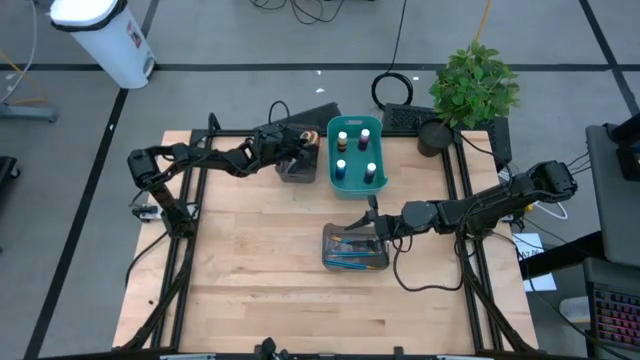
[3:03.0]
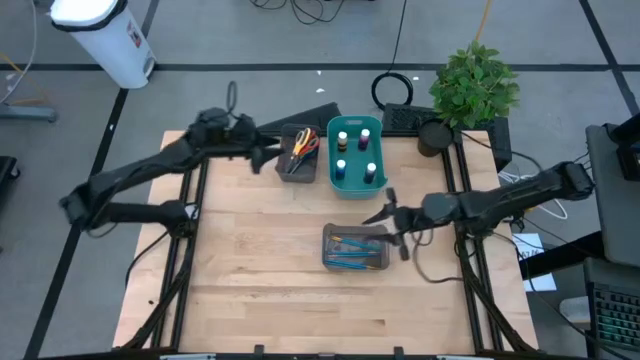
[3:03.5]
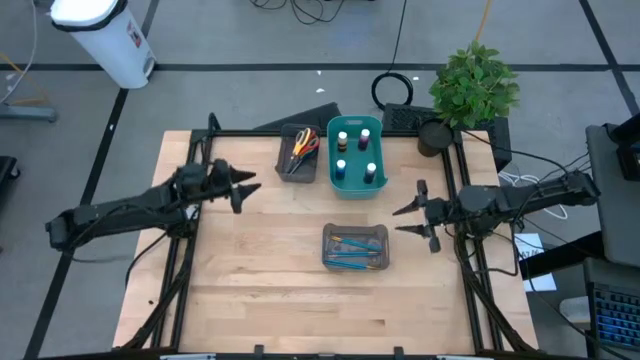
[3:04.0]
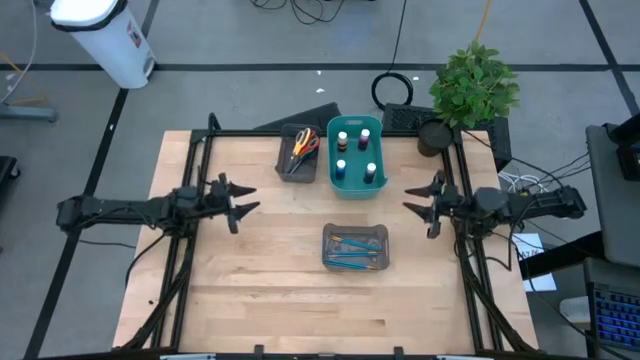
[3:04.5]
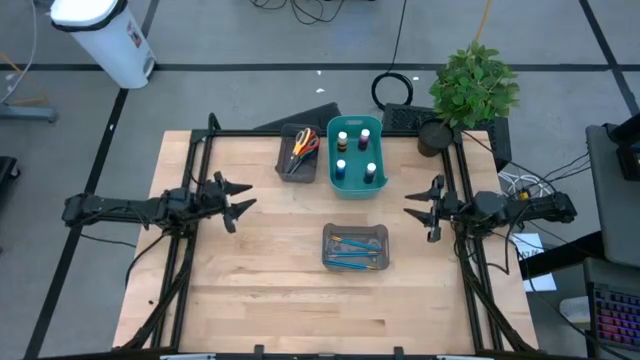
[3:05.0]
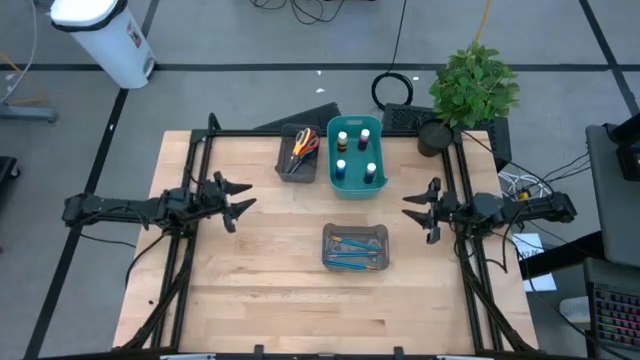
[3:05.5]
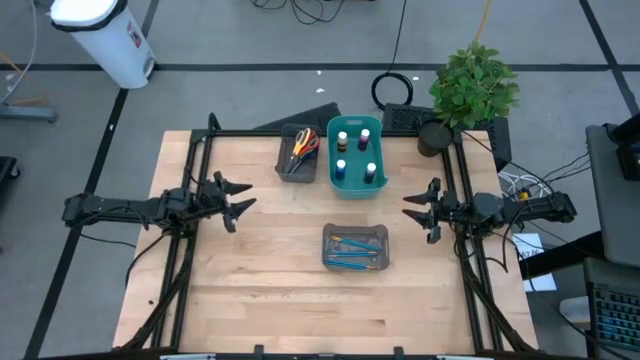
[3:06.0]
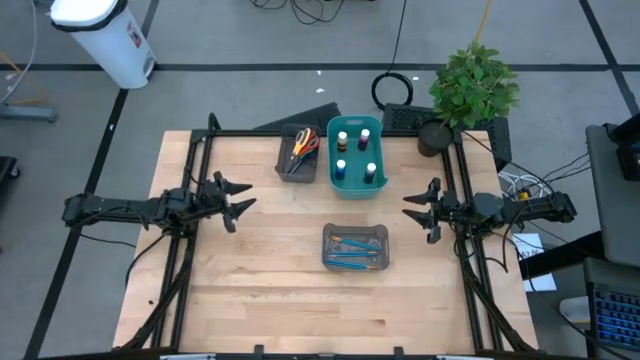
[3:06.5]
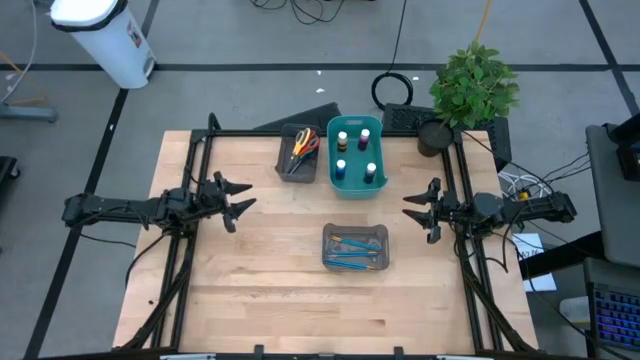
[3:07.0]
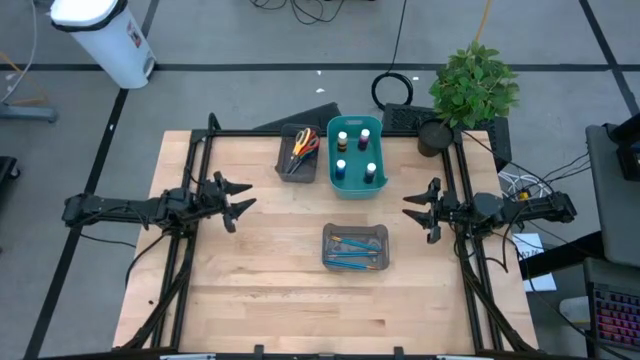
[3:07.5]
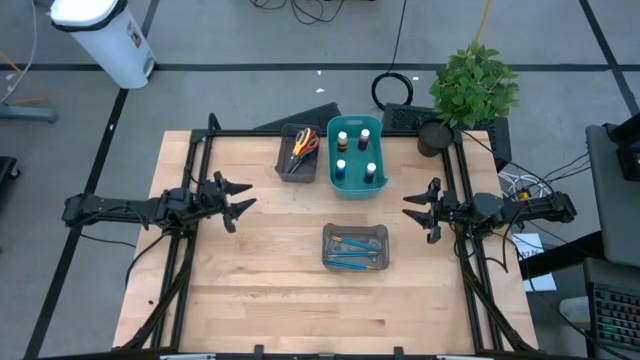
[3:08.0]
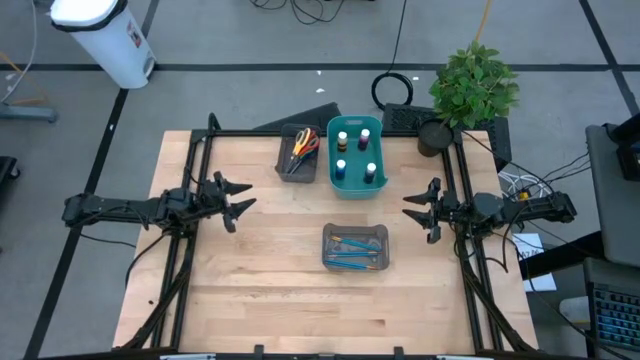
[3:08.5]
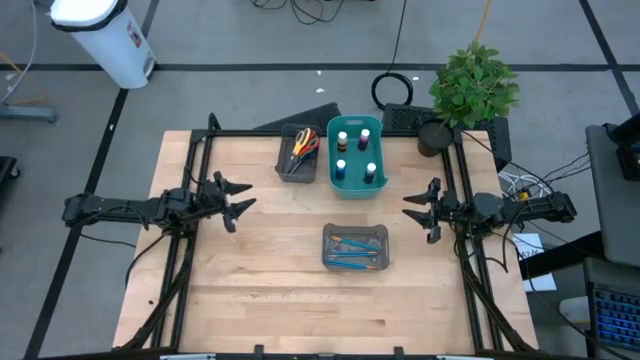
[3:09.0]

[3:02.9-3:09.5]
Task: Pick & Place Paint Supplies
Return to Home Position

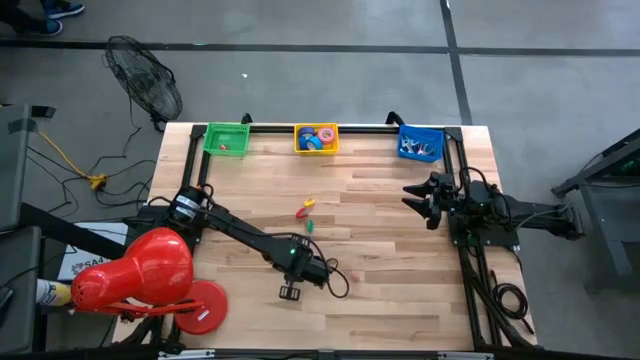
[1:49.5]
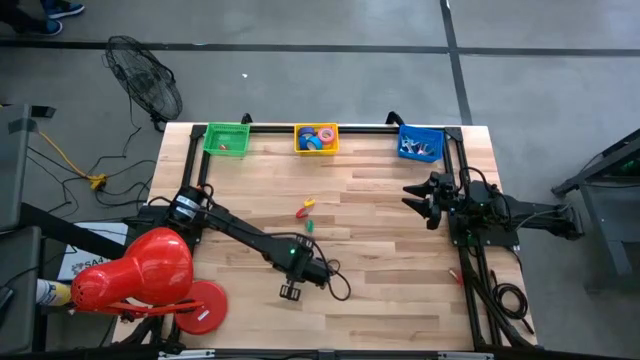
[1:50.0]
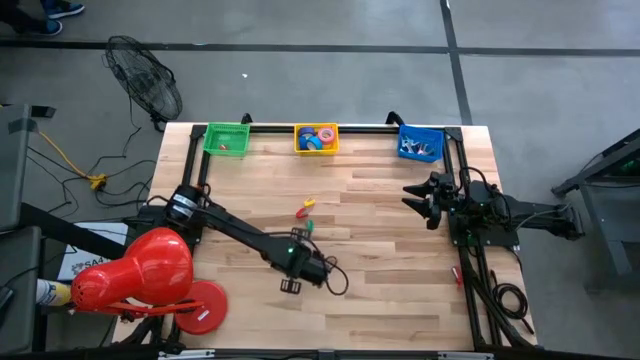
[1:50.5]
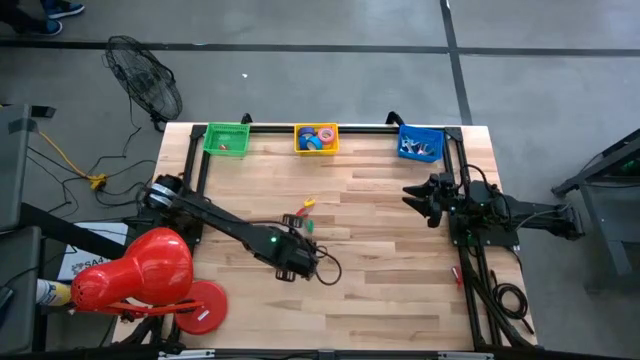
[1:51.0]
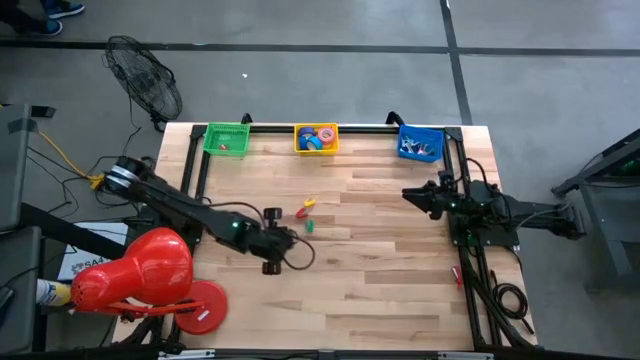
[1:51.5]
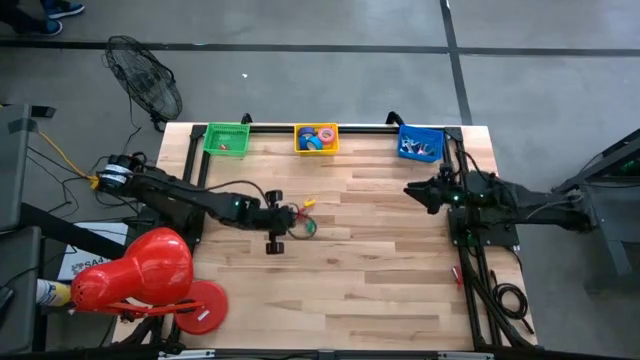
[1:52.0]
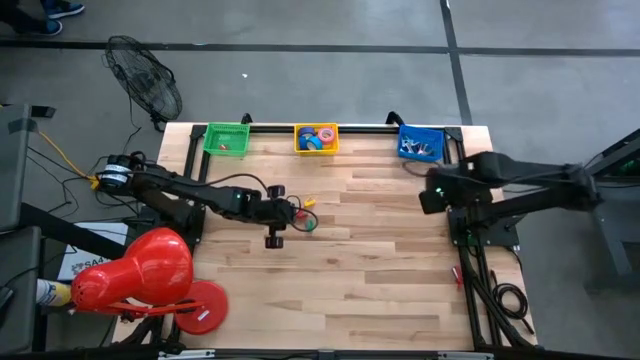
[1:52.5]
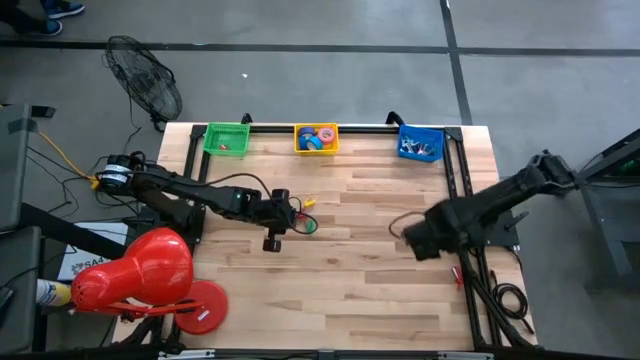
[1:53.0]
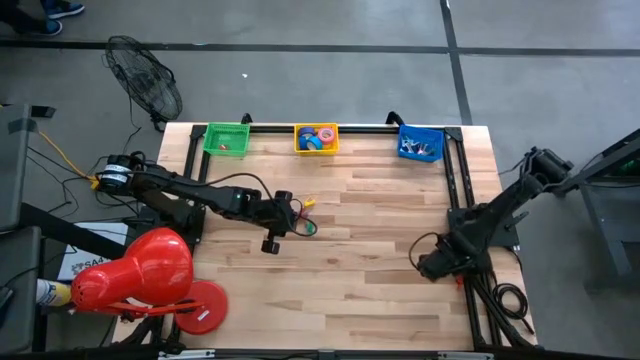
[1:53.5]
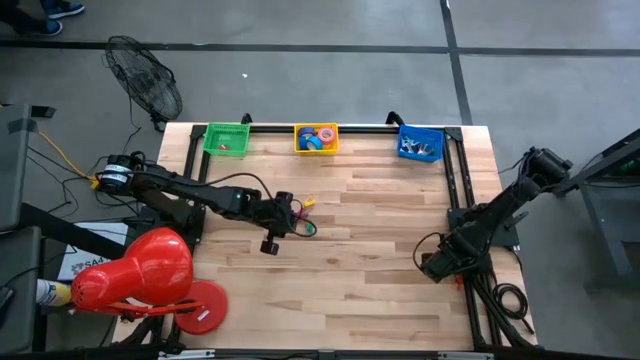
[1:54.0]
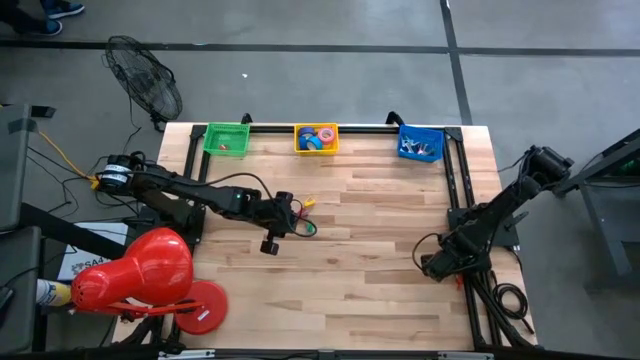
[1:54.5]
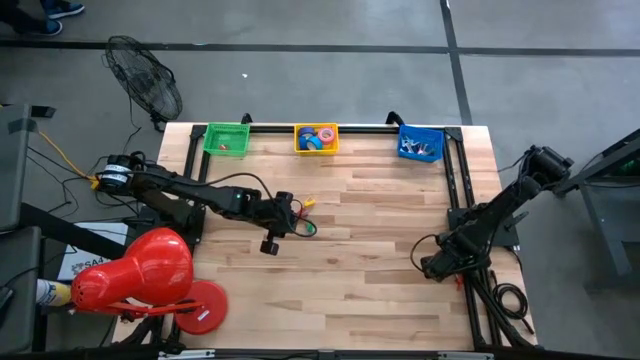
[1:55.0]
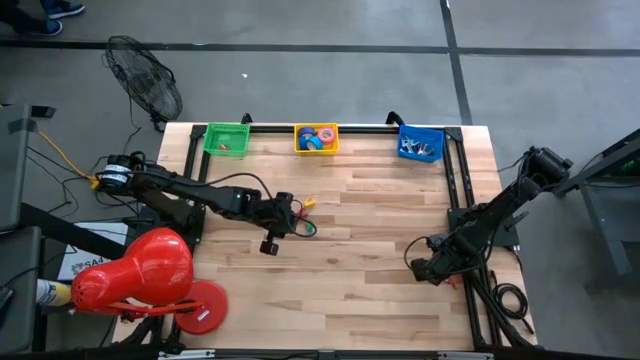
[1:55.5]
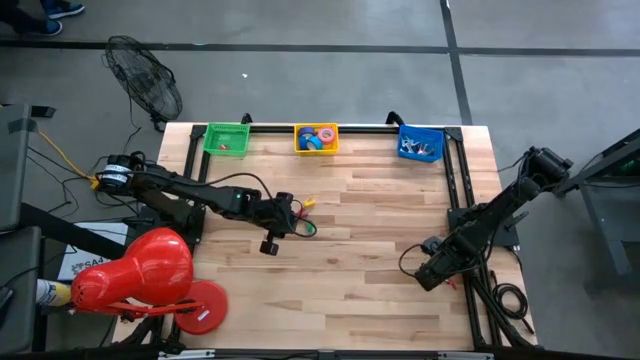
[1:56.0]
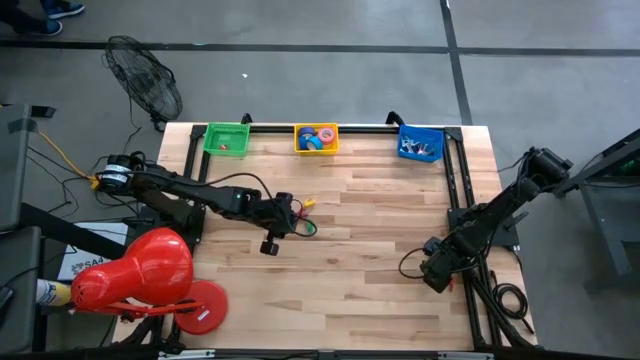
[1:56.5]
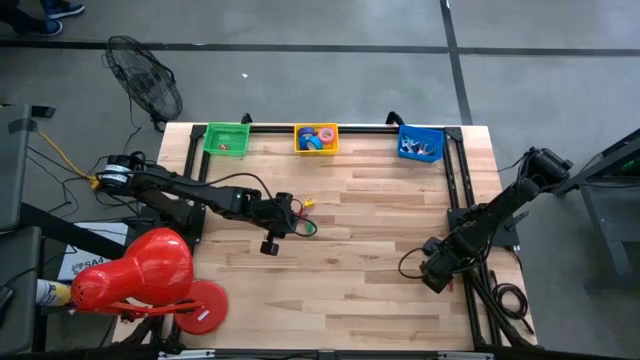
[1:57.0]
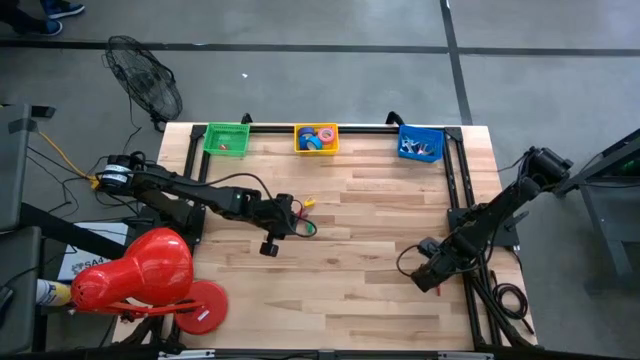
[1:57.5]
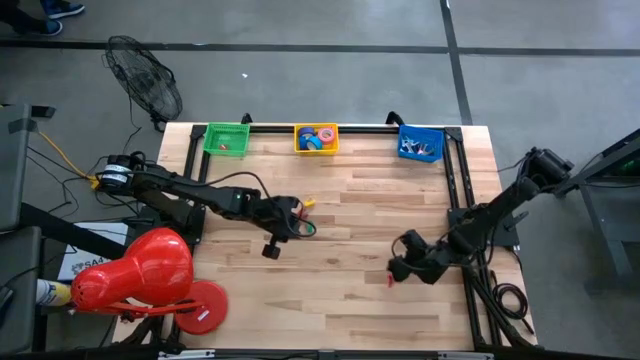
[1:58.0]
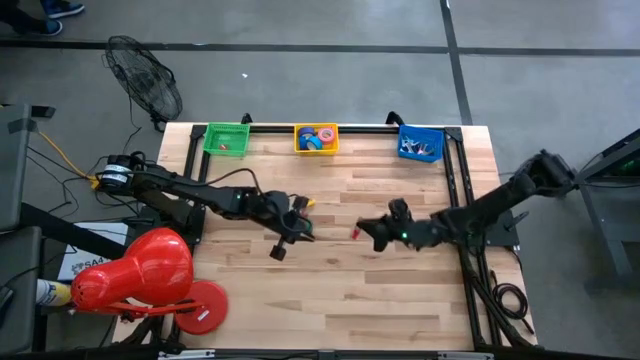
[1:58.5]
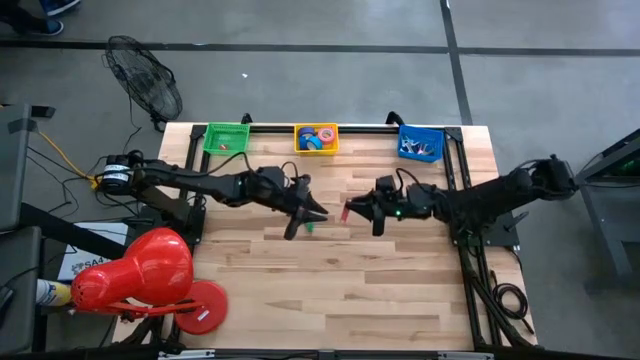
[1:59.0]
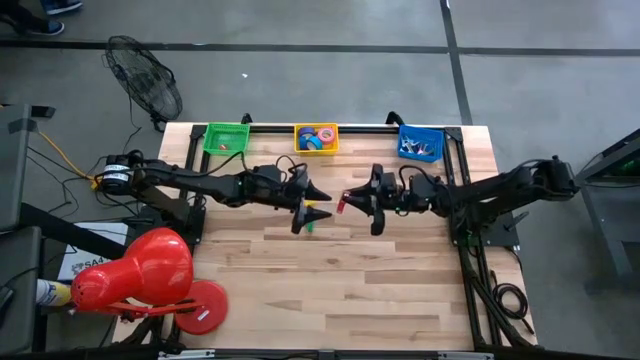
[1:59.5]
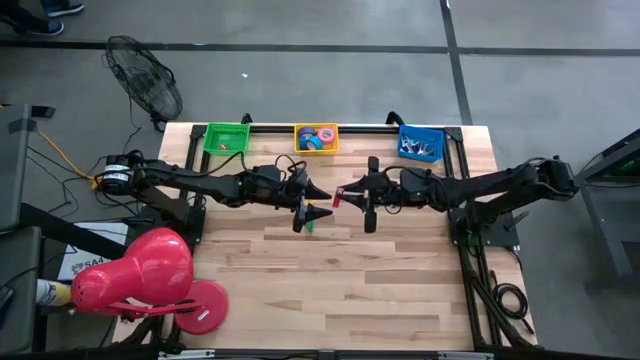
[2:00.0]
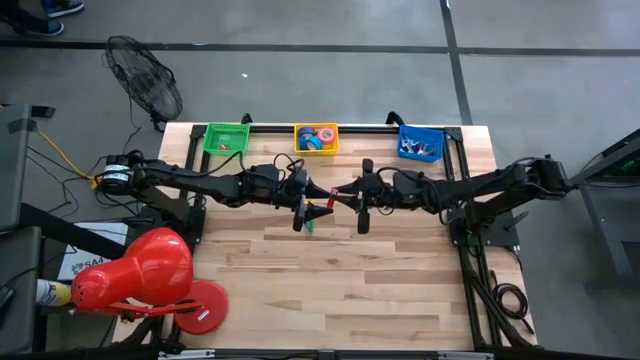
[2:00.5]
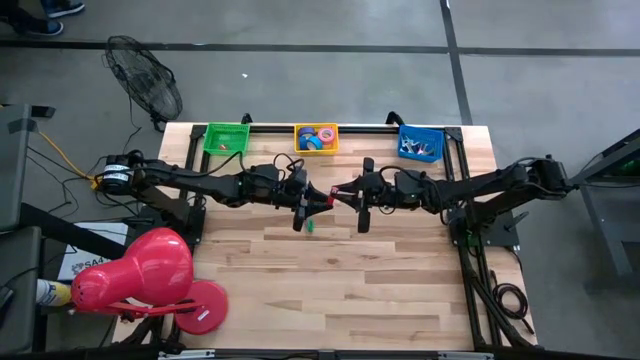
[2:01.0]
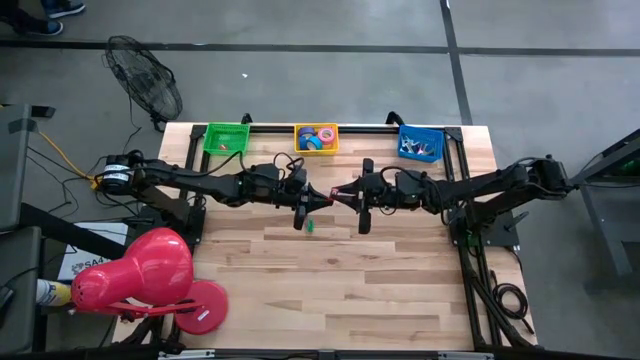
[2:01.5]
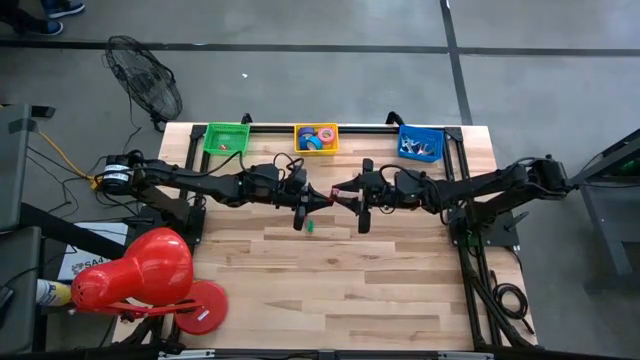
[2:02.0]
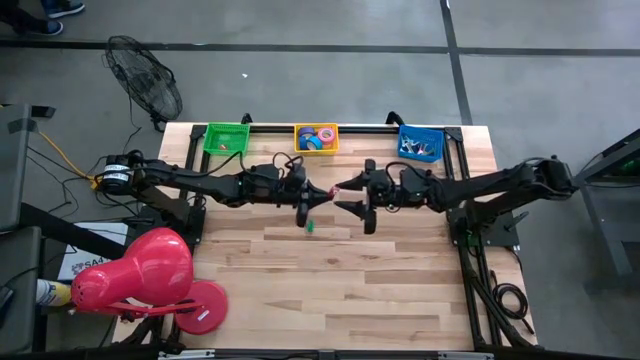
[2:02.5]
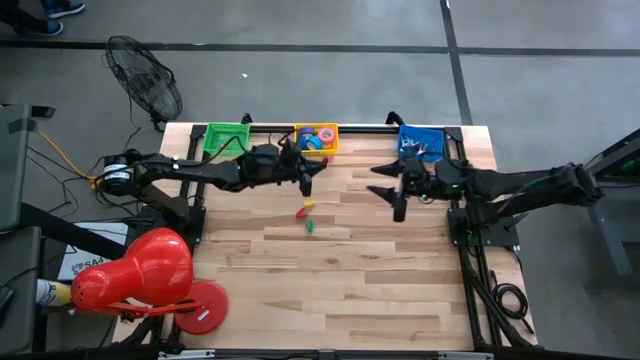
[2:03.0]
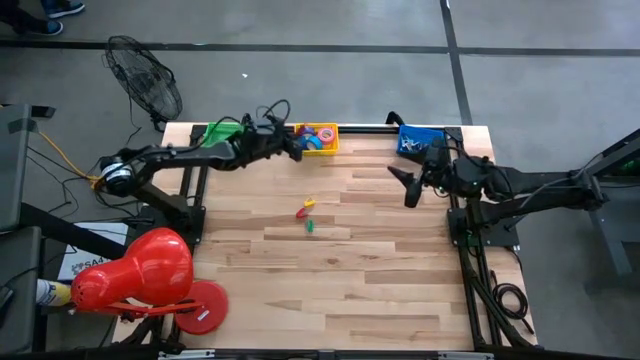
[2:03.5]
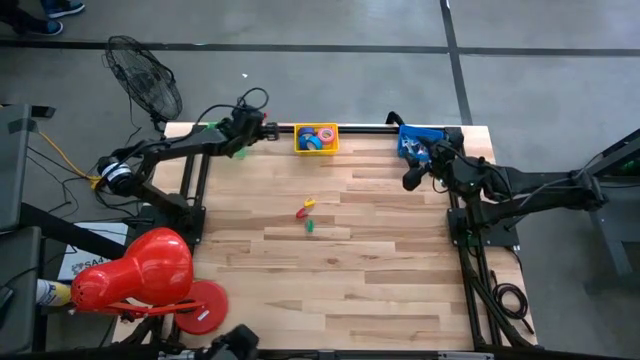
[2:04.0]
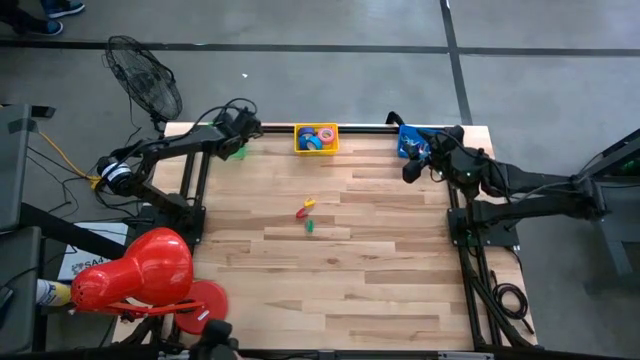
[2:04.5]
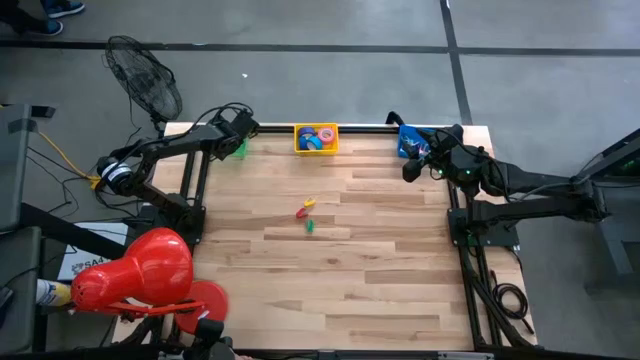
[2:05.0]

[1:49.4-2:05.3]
Task: Pick and place Stapler, Stapler remover, tape
Put the red stapler into the green bin
